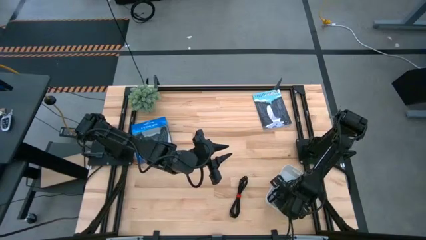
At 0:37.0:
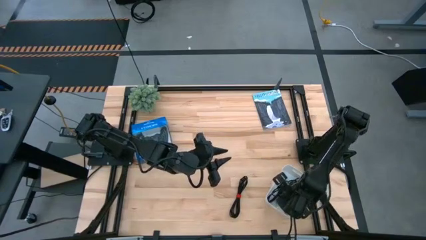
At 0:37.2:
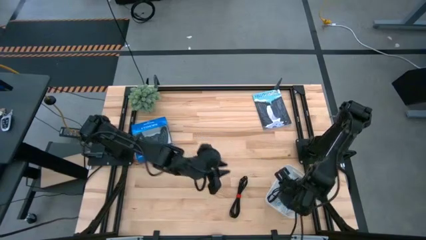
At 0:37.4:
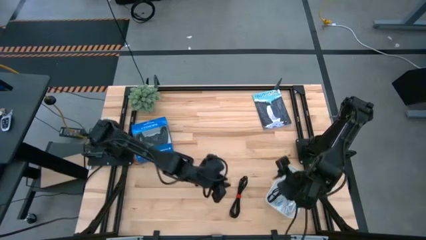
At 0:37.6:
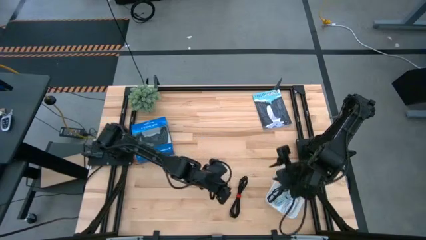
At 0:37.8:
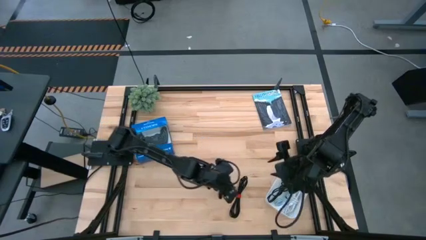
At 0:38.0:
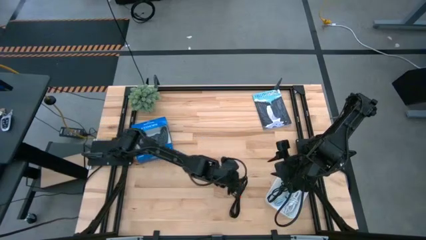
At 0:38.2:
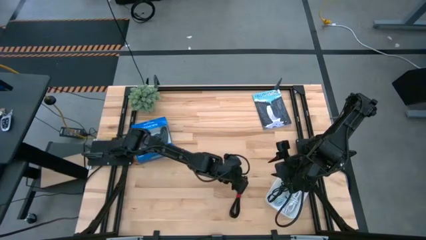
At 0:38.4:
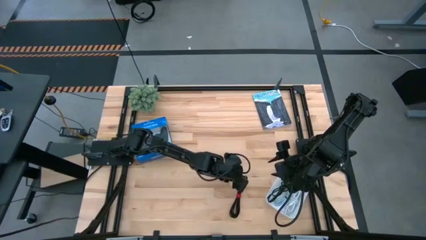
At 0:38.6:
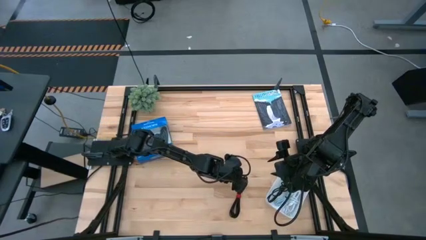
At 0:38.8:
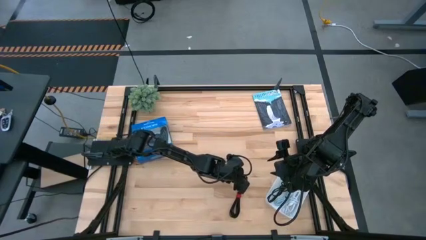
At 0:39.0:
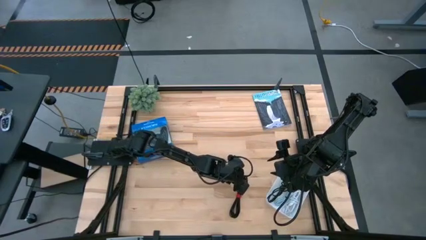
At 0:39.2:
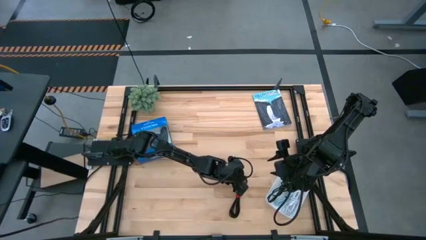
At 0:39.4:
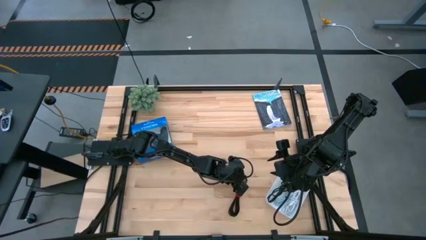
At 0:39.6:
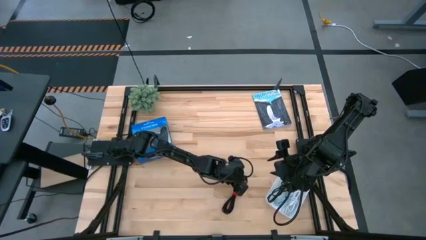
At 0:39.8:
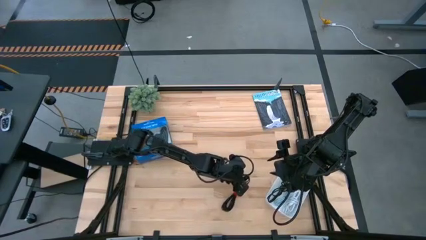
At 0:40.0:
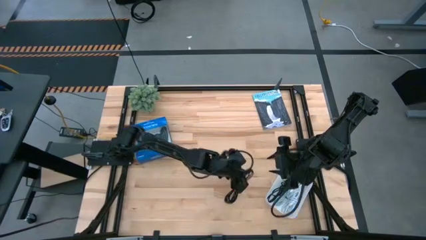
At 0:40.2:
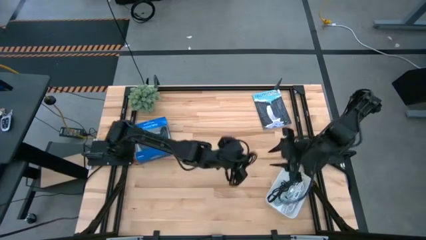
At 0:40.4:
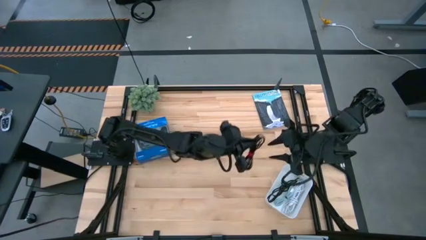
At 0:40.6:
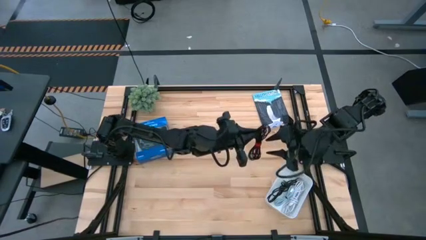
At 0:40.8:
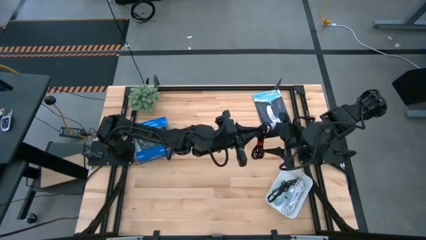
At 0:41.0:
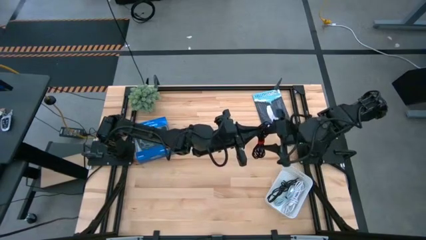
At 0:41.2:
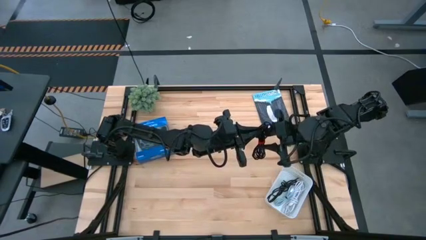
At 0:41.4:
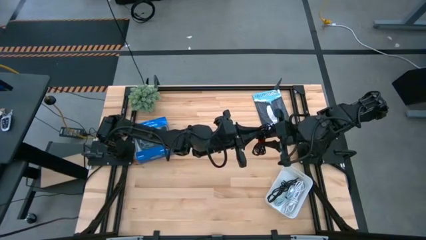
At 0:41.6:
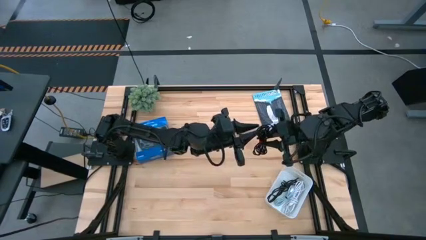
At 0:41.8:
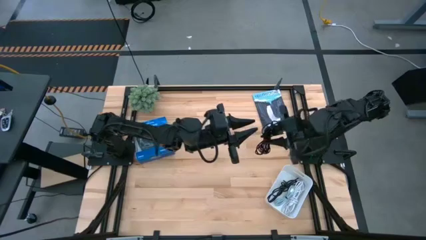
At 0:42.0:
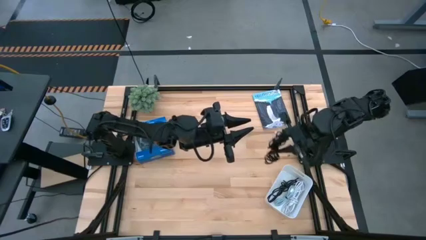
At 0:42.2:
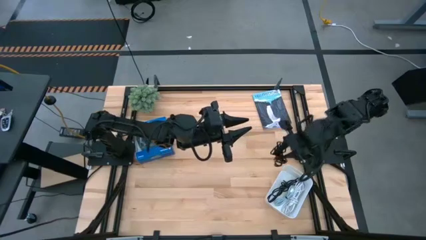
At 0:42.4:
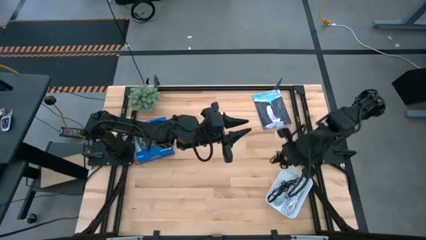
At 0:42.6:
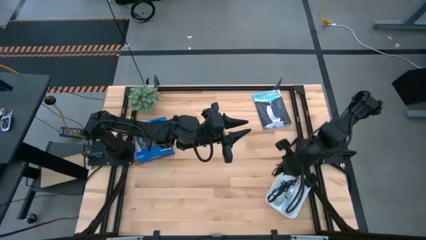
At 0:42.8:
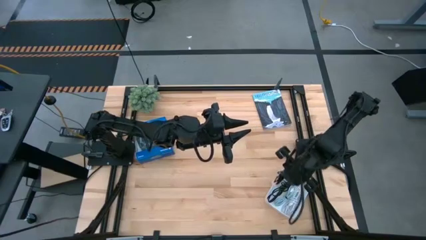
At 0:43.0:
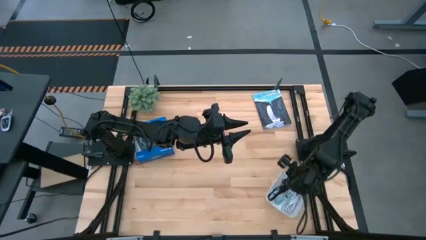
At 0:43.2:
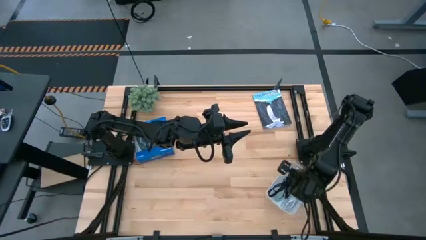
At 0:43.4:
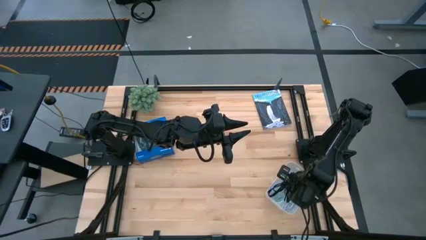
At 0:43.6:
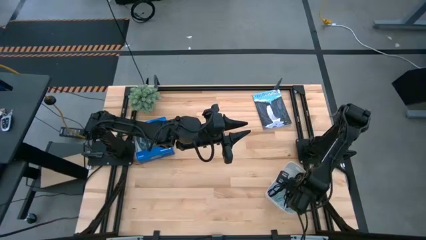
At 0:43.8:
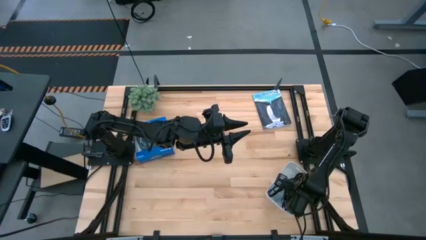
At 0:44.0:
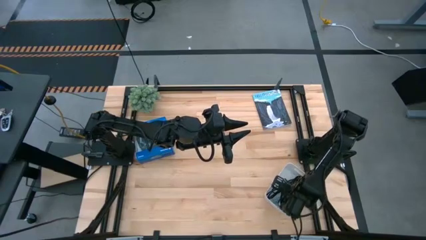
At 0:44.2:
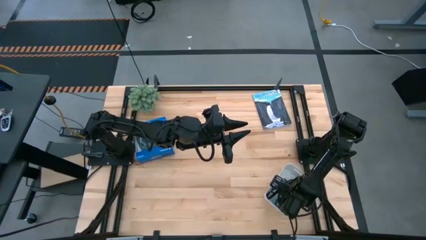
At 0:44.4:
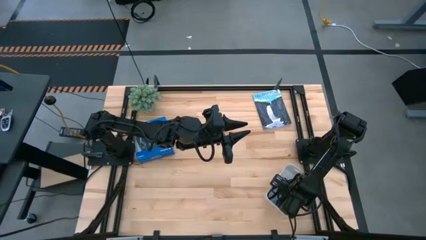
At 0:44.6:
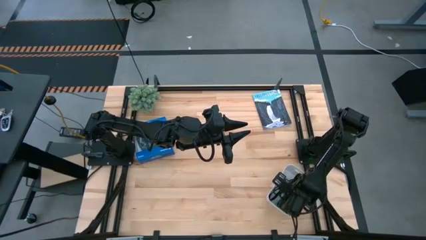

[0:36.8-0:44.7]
Task: Pick and place USB-C Cables
Put the black charger cable into the white bin

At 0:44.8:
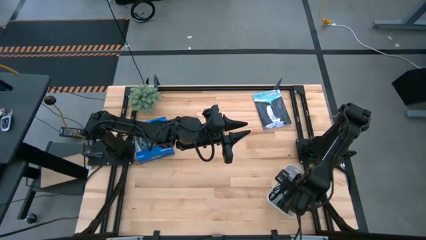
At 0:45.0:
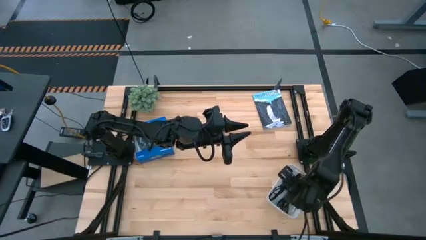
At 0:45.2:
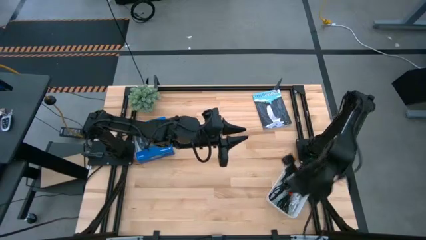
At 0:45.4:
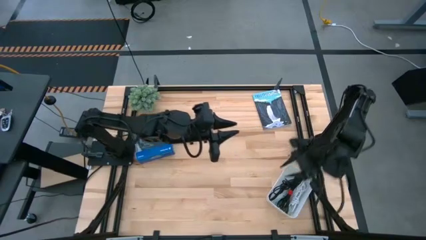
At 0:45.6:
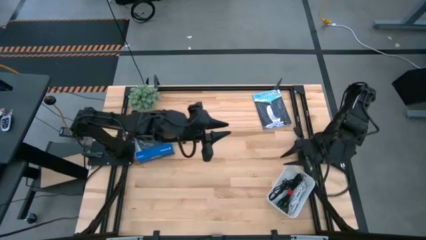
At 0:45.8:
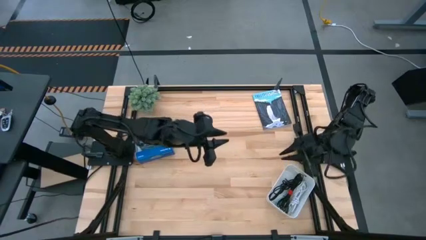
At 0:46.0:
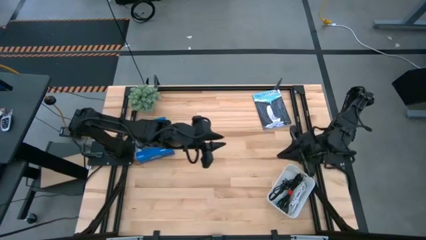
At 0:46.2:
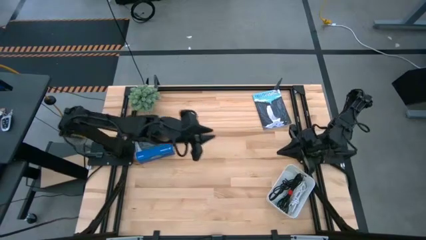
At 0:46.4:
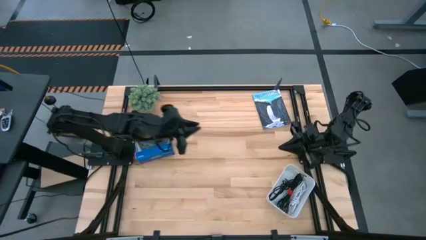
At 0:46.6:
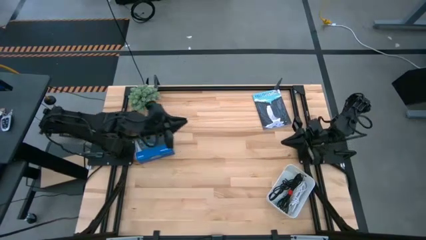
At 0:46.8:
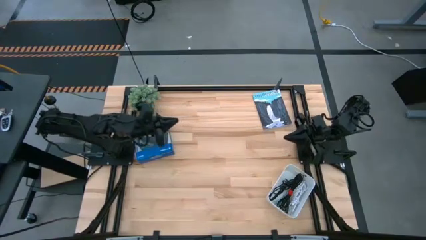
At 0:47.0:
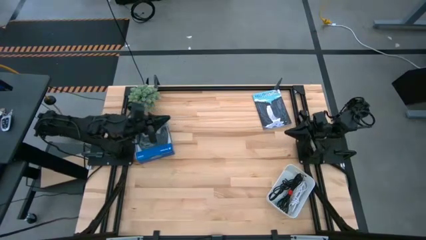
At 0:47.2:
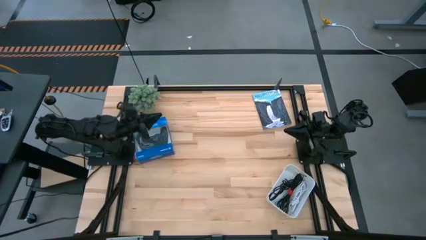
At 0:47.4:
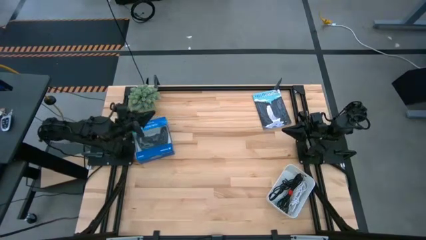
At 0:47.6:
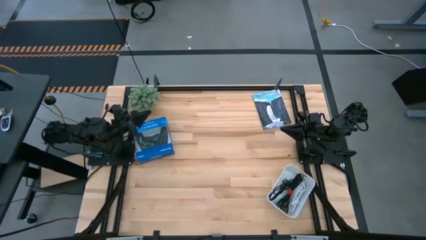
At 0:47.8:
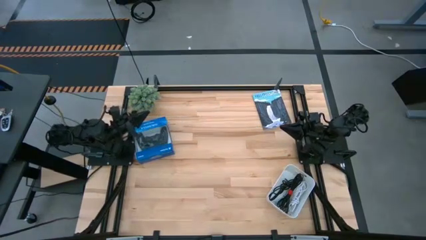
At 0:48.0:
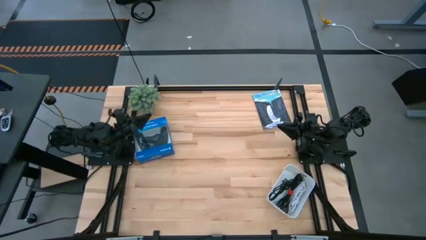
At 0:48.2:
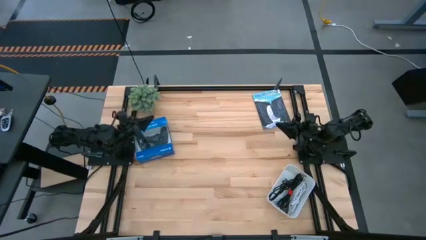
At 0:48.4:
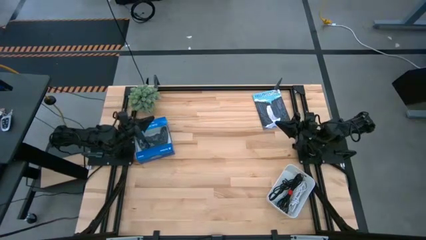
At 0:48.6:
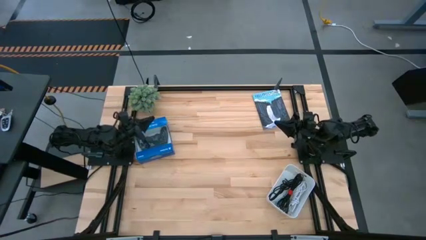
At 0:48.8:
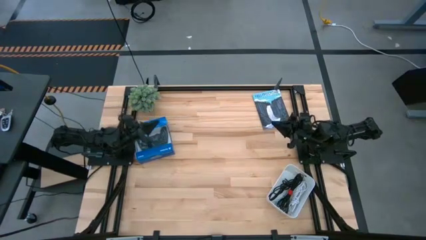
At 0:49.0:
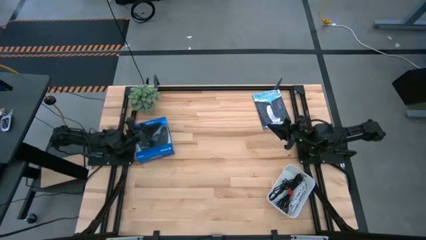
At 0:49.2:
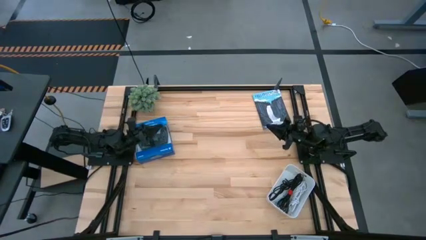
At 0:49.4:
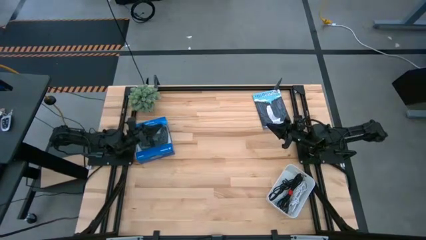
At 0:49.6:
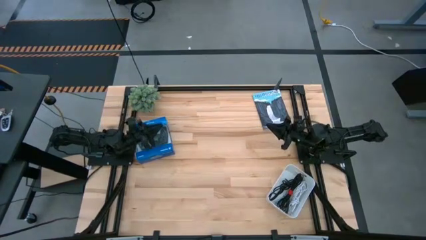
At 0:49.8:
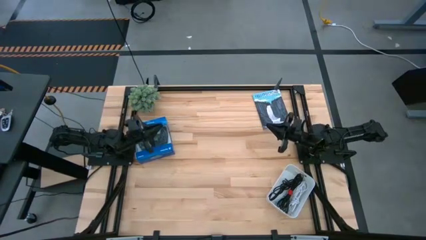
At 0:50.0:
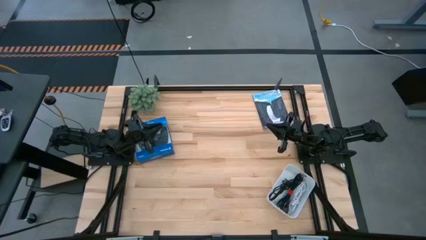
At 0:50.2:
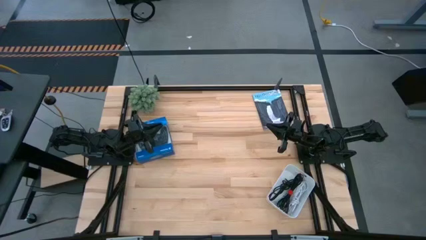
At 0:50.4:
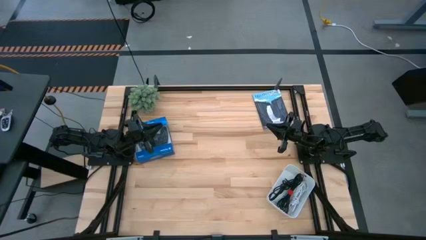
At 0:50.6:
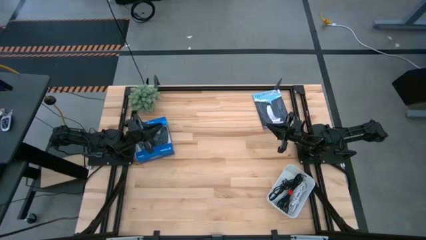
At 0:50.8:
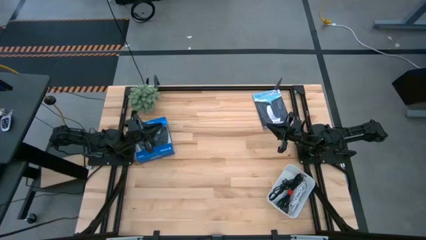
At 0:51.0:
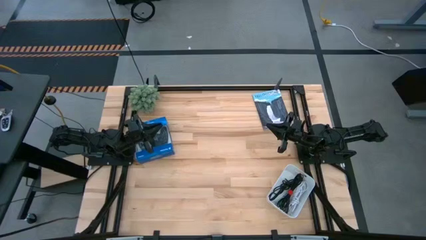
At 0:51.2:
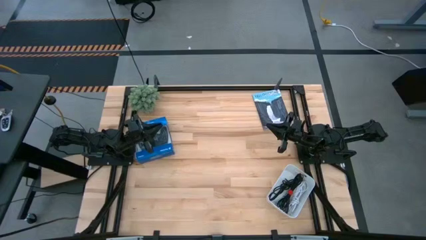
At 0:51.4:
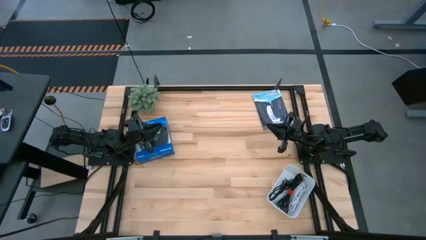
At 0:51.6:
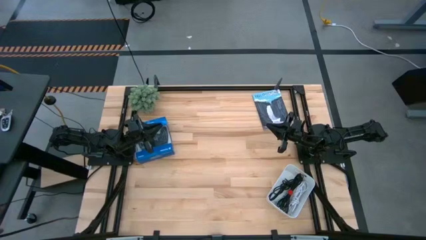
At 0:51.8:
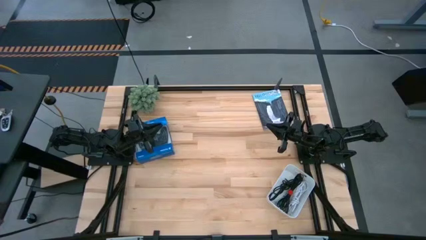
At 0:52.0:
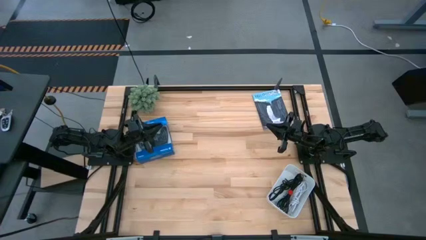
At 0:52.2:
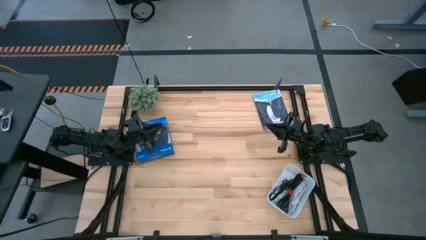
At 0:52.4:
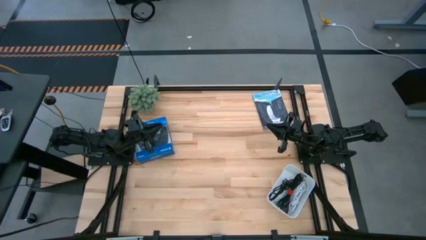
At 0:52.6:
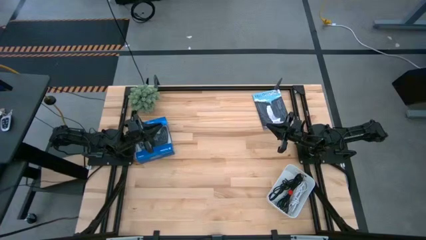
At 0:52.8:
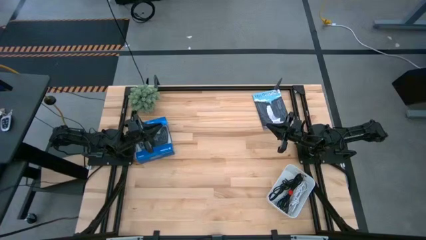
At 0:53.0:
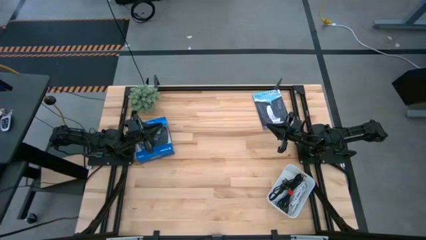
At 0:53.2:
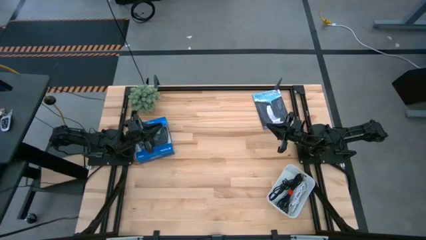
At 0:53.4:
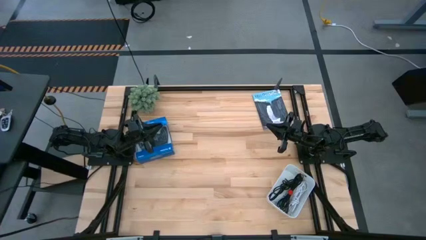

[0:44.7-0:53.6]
Return to Home Position
